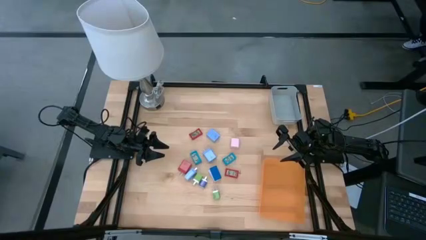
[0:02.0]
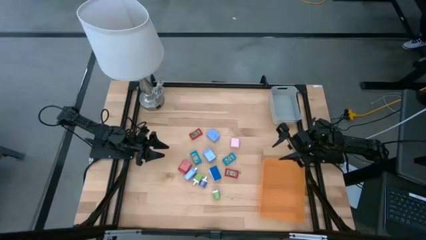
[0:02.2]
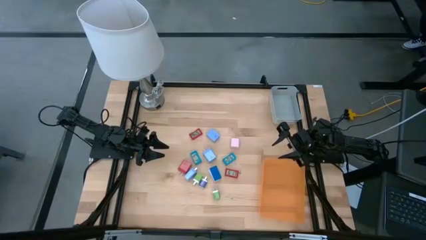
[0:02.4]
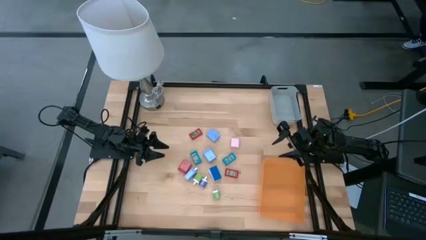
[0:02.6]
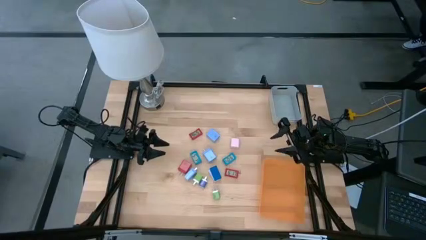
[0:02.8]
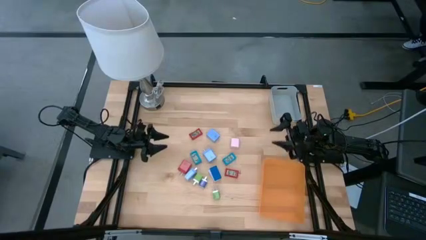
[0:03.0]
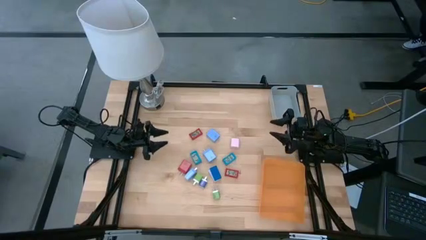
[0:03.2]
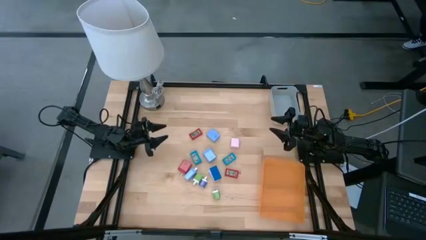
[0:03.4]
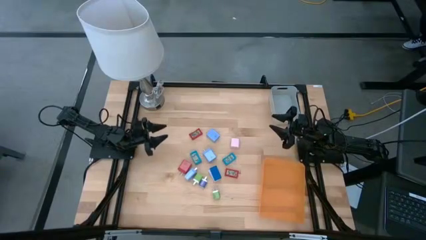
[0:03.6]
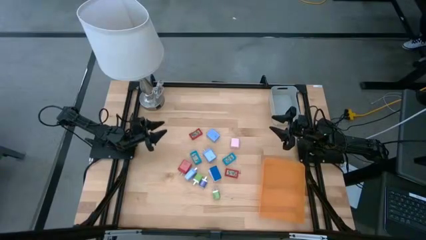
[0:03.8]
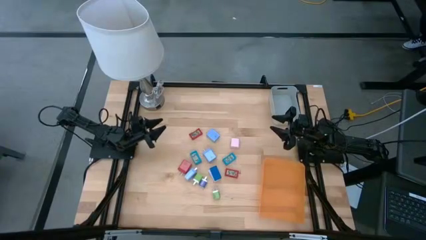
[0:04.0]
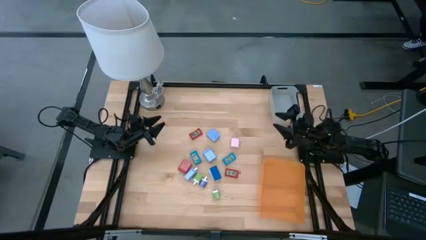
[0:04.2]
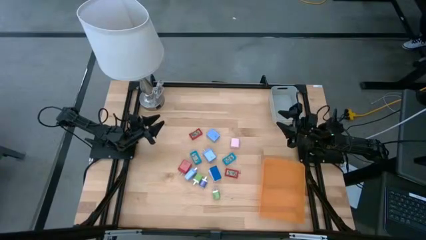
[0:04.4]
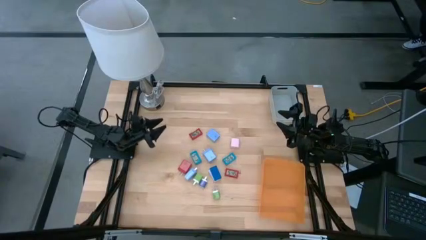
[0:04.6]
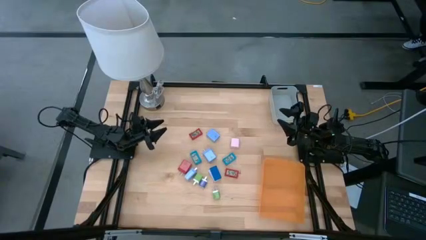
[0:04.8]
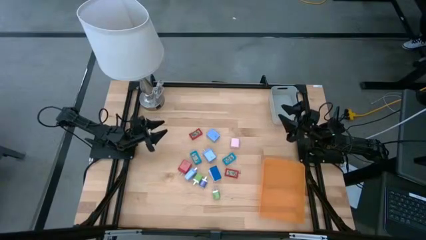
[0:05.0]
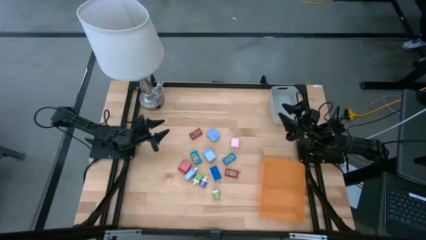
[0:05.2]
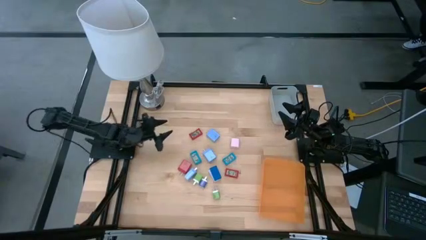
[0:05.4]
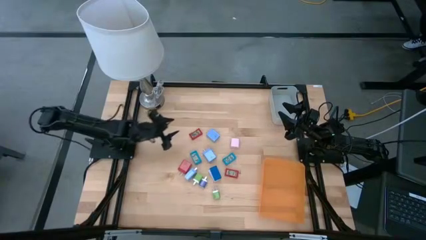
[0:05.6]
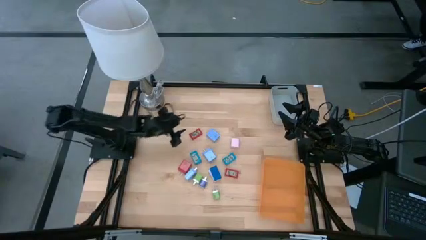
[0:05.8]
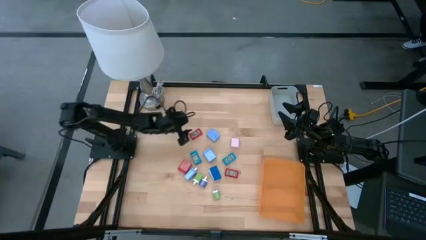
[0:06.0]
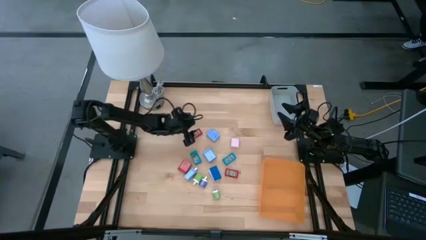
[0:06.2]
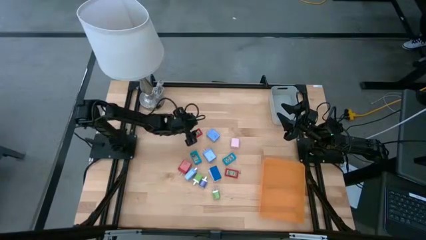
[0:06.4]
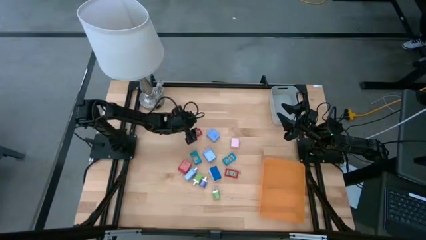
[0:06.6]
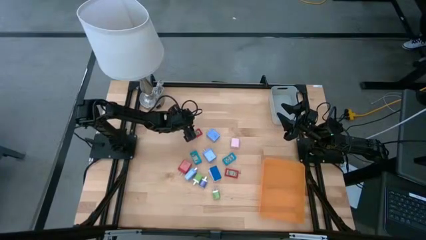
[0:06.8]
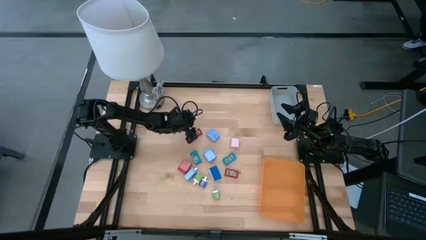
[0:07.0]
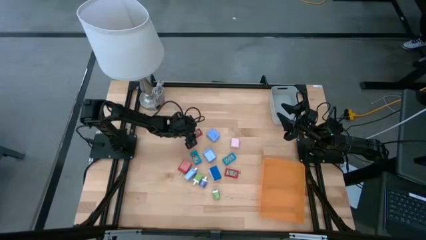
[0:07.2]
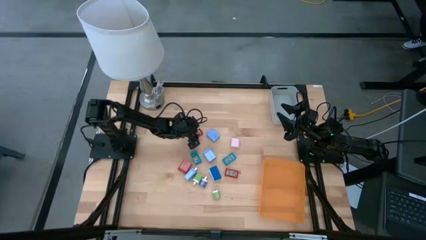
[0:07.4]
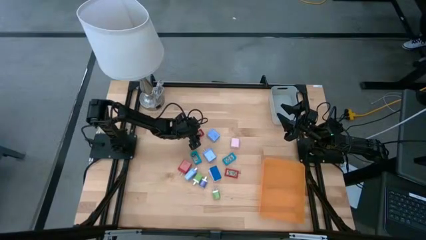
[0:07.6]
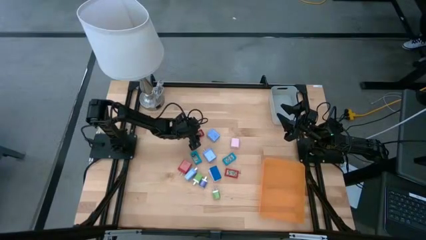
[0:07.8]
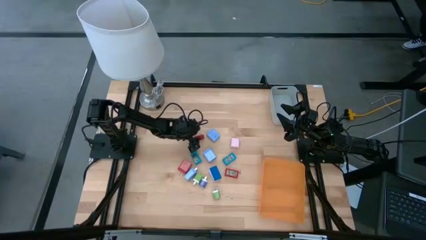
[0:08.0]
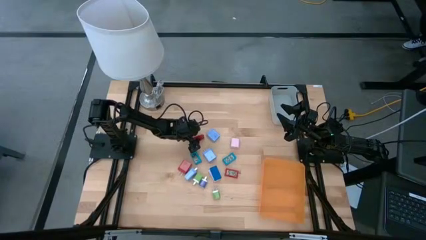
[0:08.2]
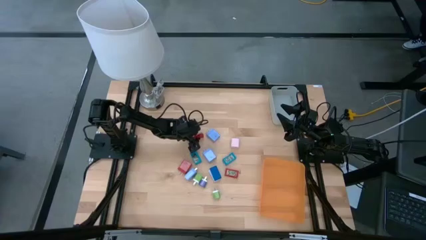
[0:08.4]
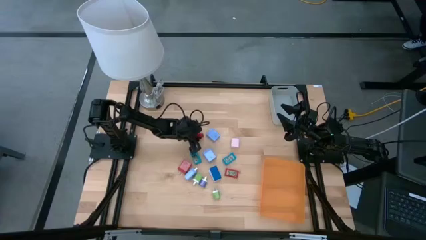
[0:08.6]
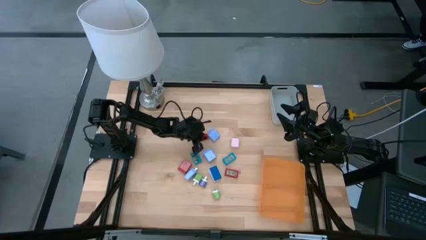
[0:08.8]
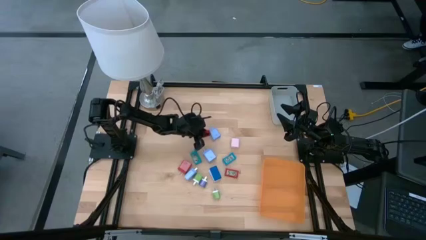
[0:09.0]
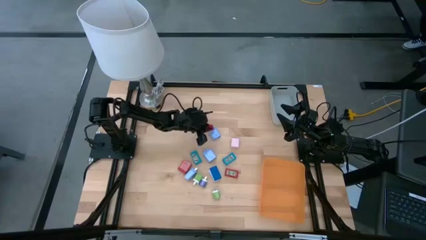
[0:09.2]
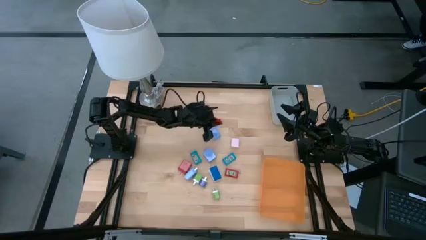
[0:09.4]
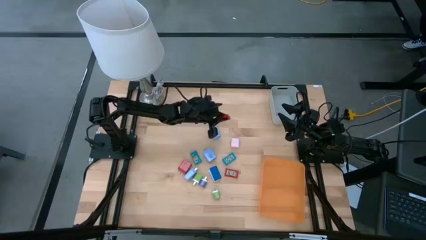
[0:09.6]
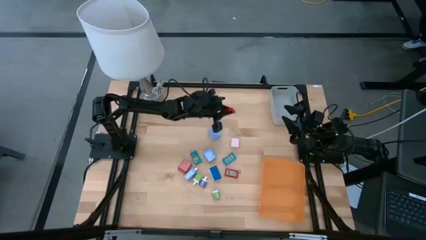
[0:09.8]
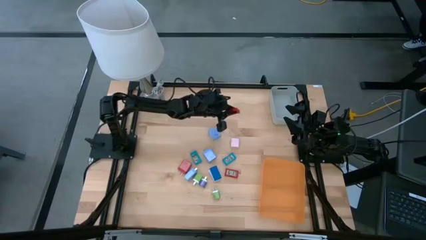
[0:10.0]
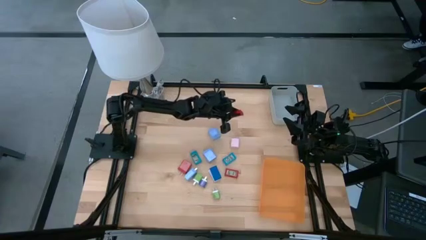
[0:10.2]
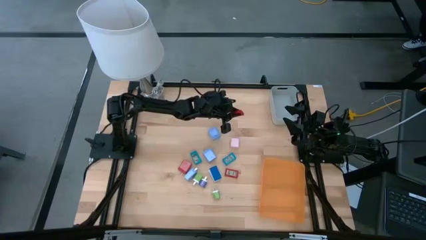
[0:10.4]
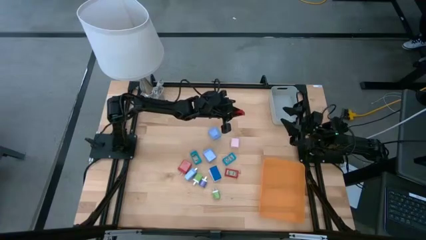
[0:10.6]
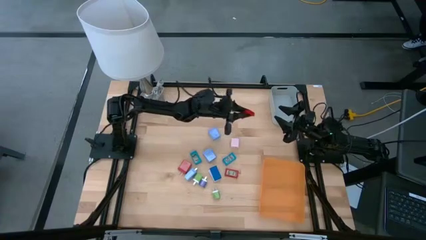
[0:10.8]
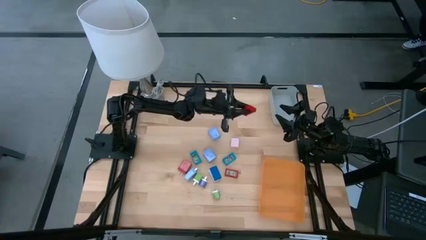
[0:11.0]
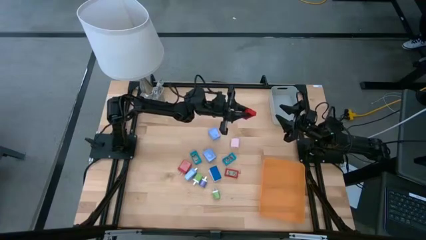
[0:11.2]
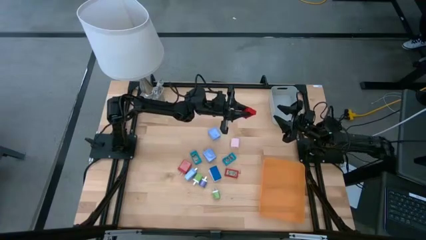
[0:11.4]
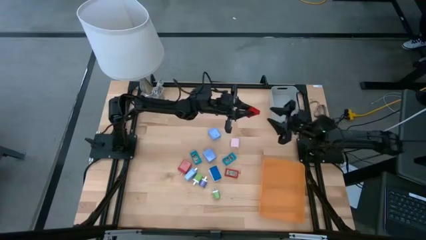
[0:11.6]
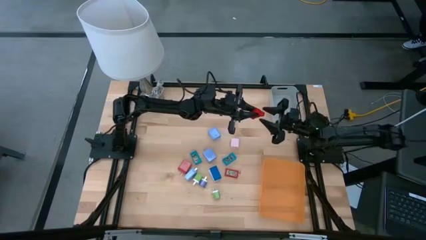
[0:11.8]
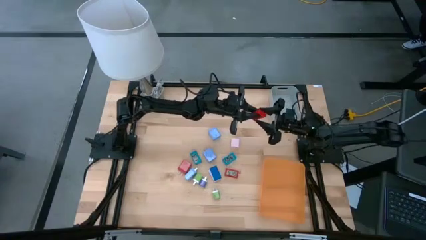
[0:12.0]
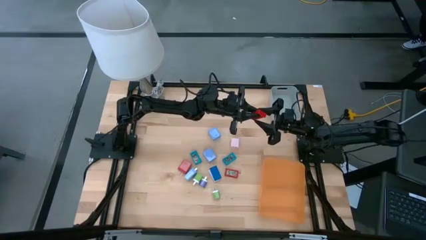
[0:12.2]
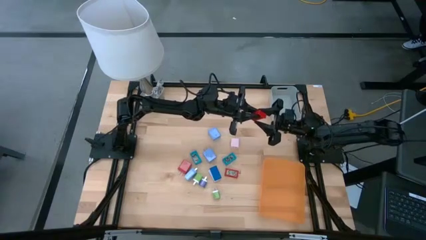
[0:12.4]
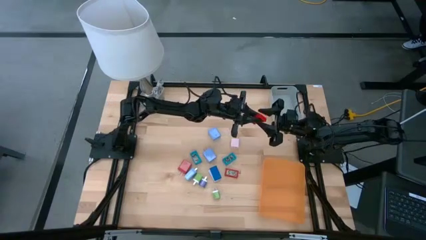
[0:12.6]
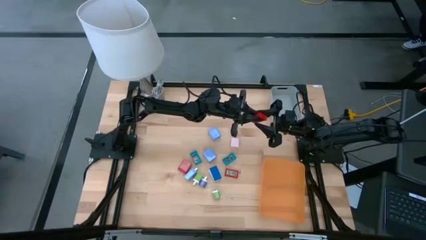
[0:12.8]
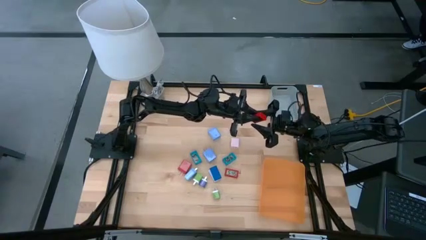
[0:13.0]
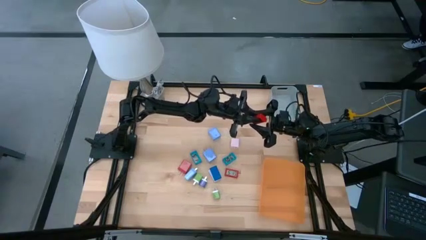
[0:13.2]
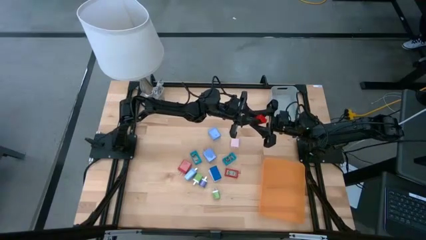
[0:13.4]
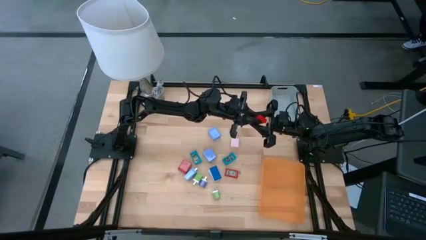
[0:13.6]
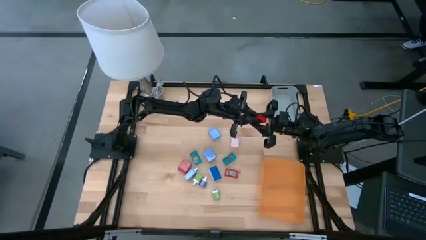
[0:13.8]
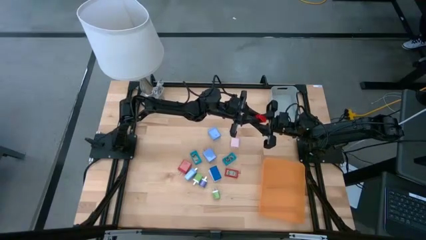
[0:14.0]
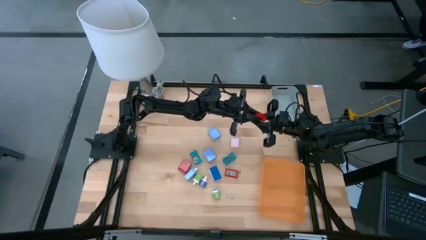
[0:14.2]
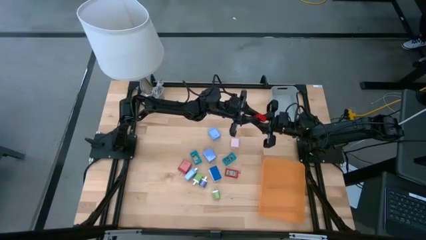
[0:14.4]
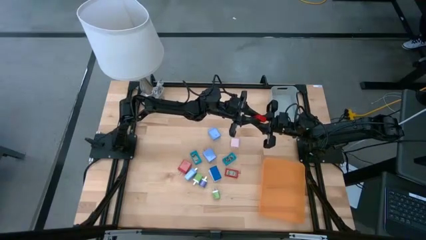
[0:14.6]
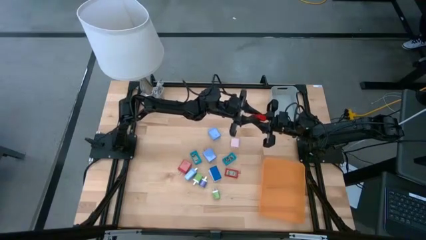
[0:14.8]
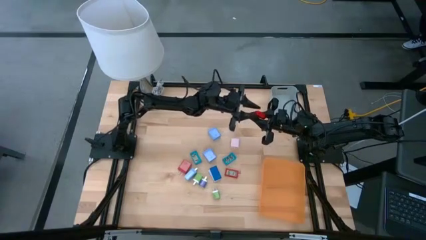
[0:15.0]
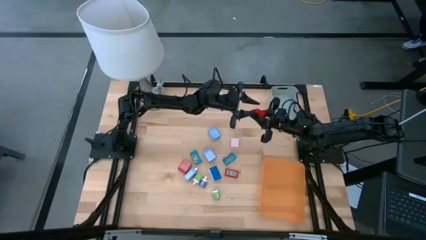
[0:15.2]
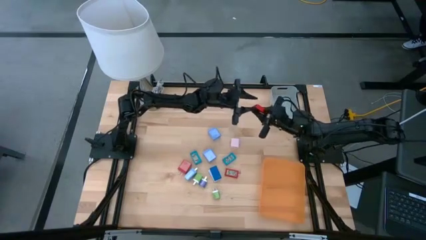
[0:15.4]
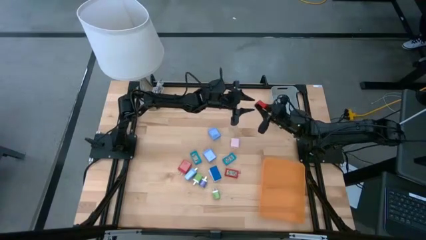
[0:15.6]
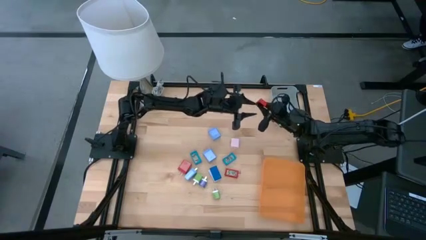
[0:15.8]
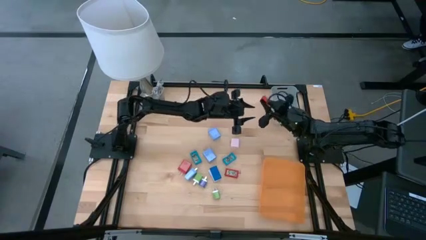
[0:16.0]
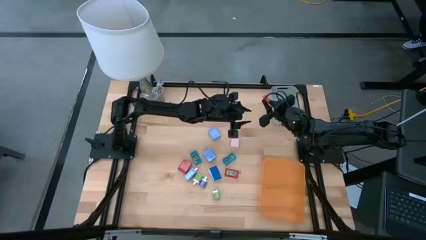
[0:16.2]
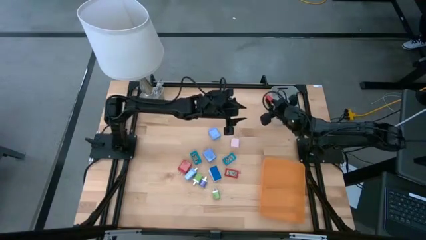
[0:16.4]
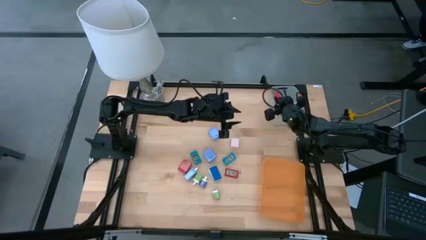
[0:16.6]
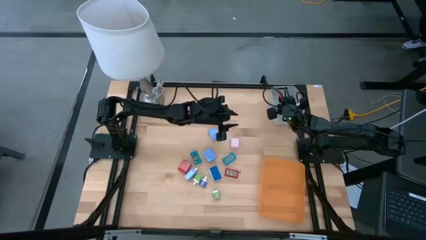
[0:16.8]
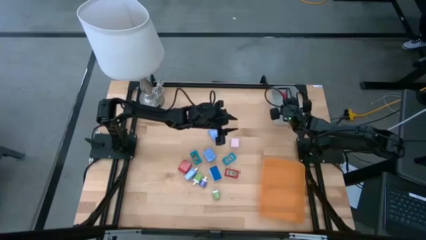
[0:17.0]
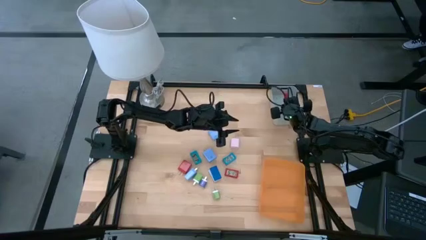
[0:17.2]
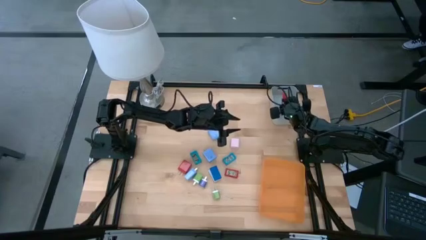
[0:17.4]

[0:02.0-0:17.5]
Task: Pick & Place Office items
Put the top red digital clock into the gray bin
